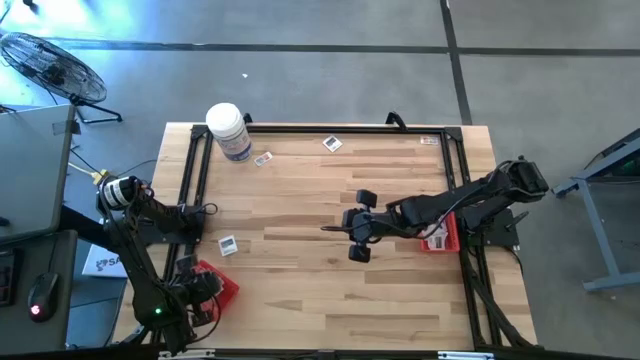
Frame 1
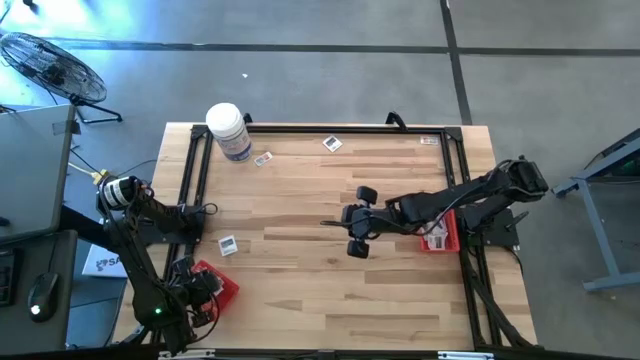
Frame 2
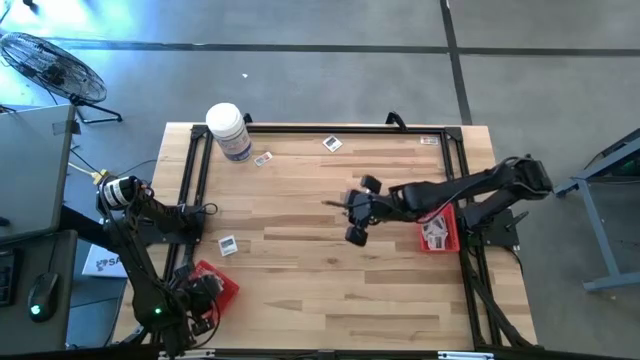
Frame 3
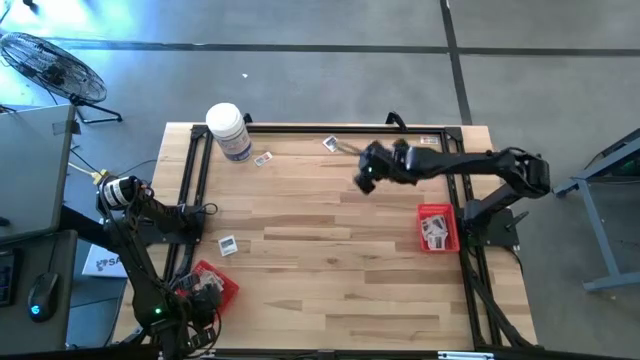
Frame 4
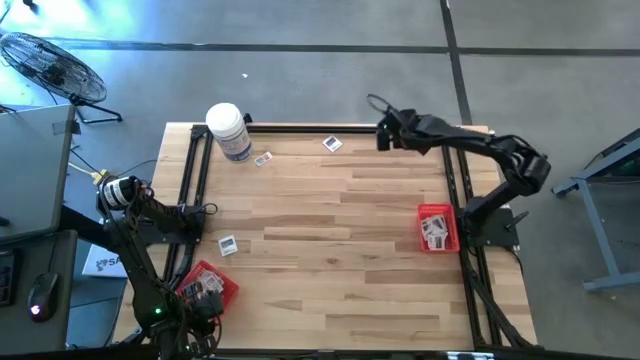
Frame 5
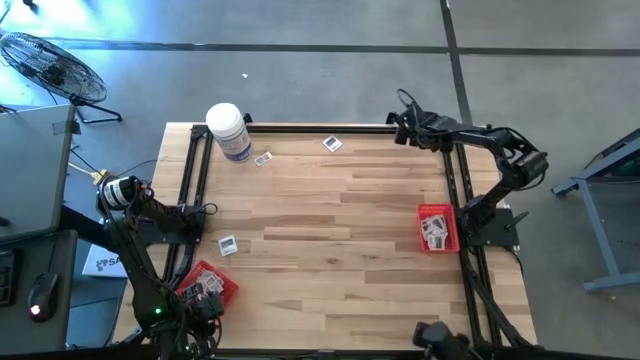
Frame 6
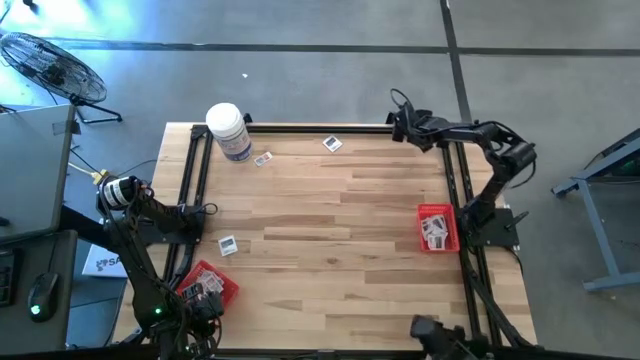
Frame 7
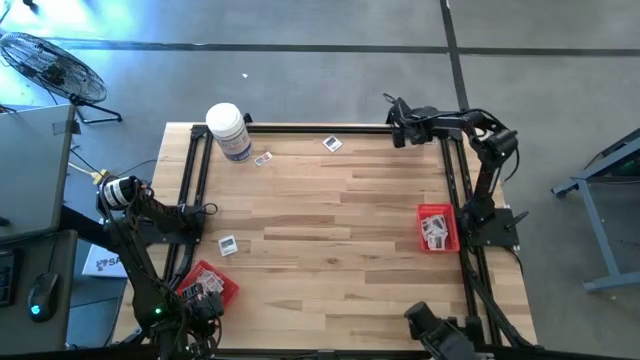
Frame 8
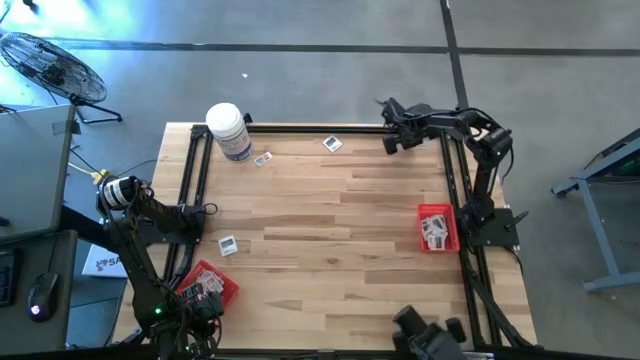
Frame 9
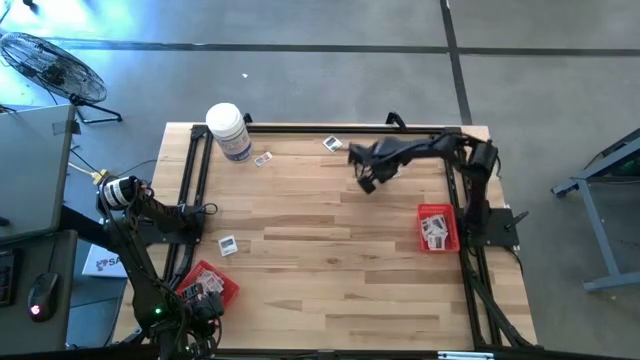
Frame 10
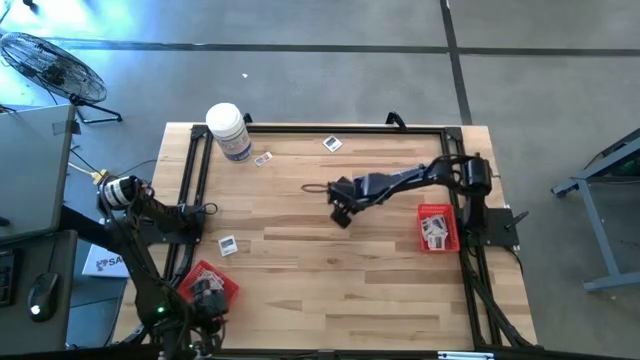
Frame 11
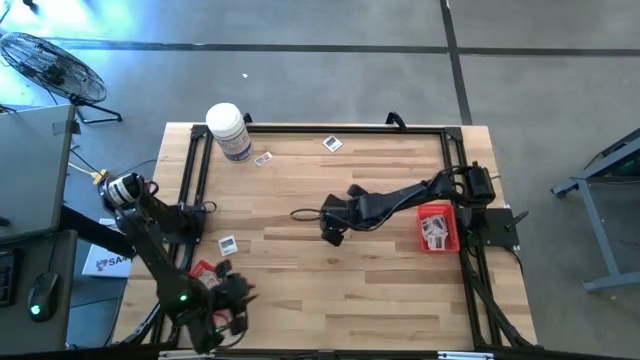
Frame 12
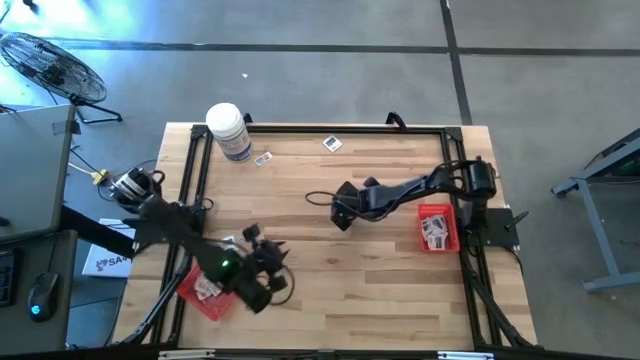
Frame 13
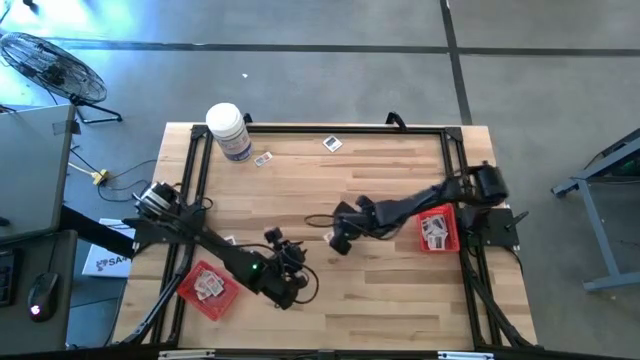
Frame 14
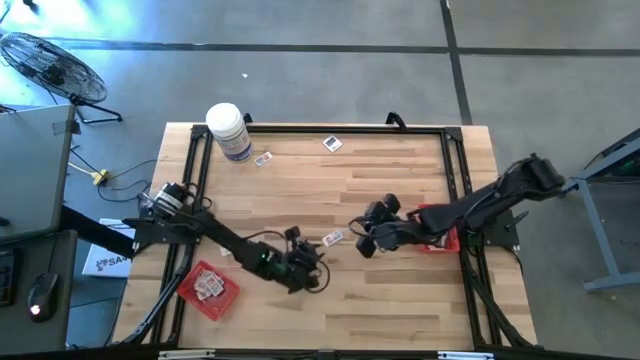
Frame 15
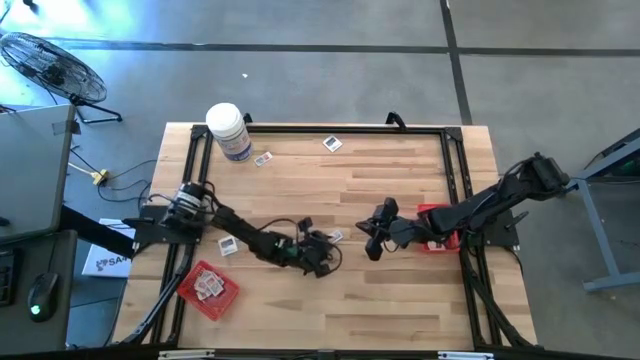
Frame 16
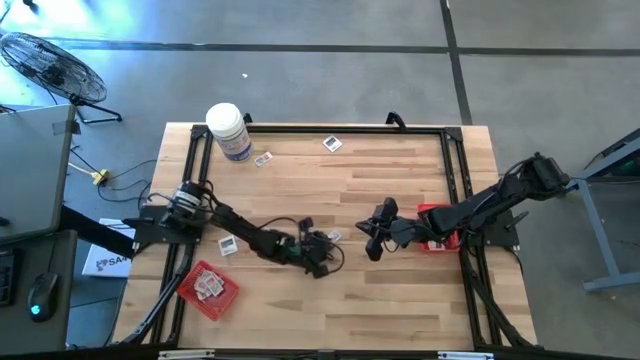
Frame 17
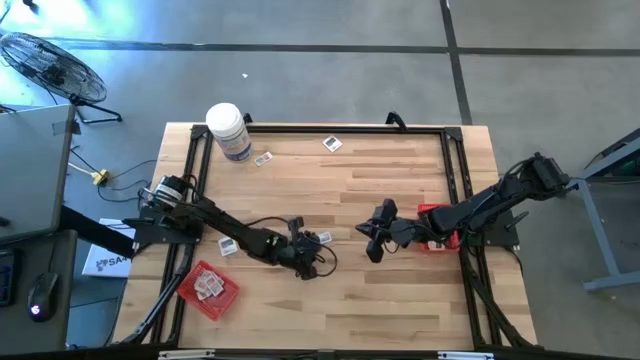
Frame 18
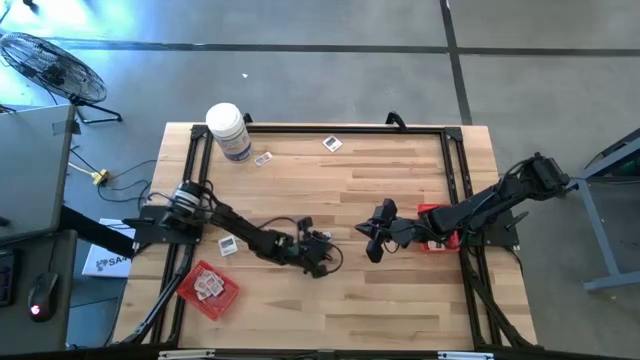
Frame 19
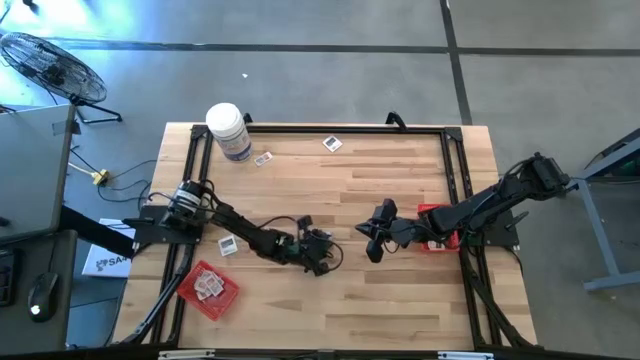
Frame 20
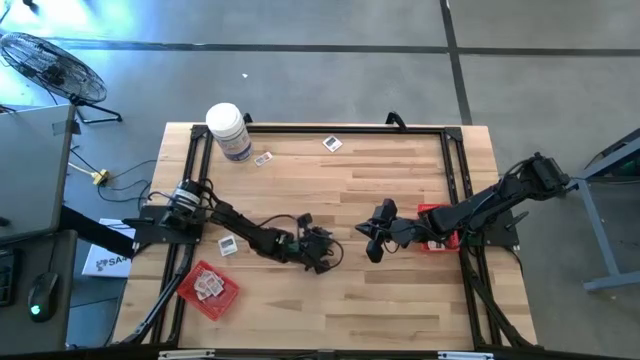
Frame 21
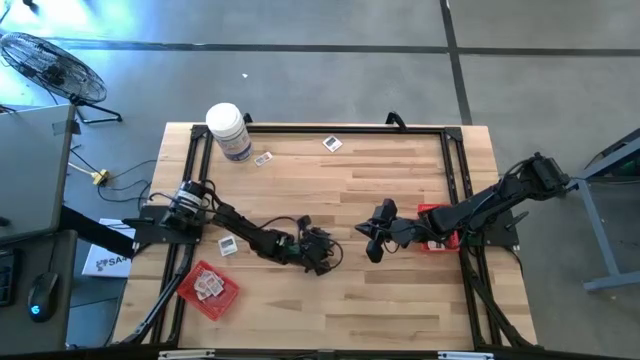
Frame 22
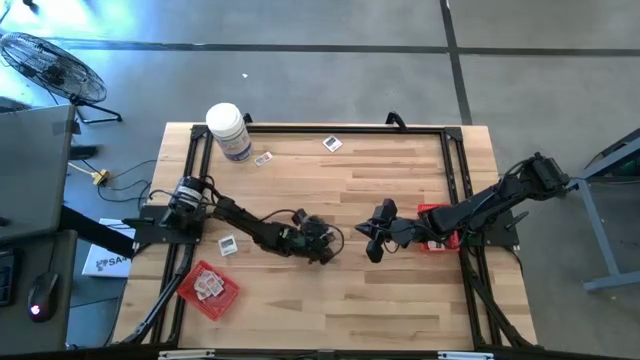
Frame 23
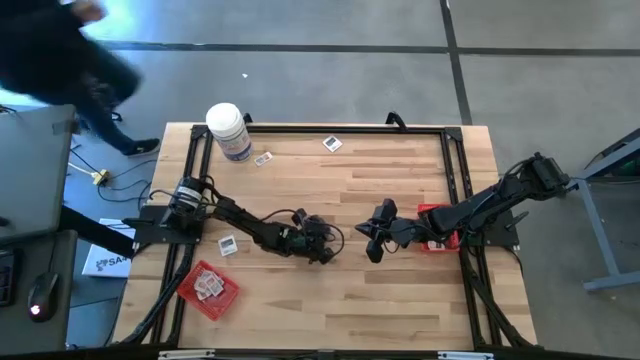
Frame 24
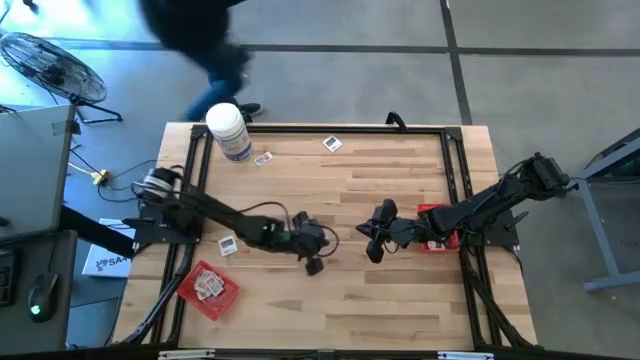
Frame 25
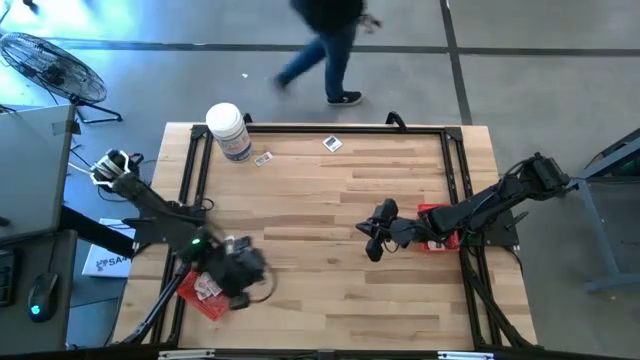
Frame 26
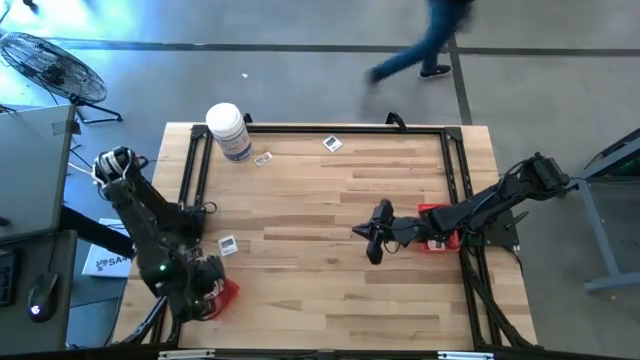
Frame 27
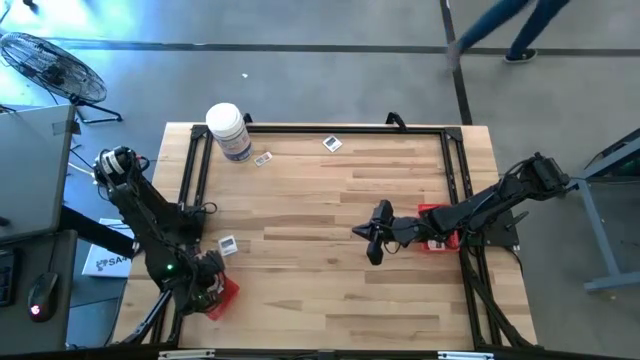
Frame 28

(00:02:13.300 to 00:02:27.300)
Task: Pick & Place First Aid Supplies
Put the ointment pack into the left red bin

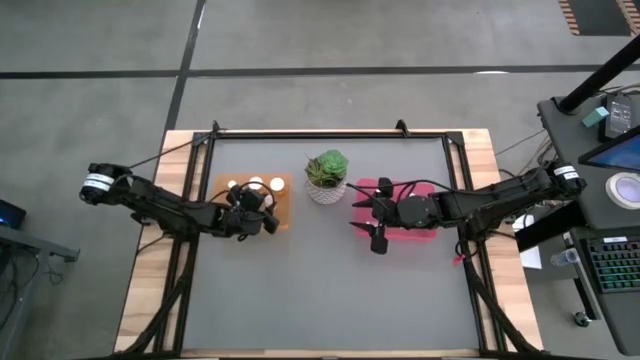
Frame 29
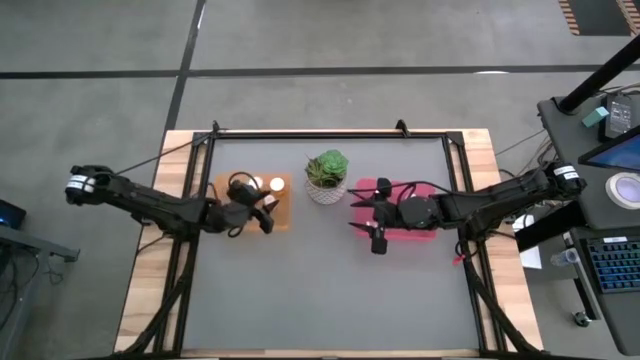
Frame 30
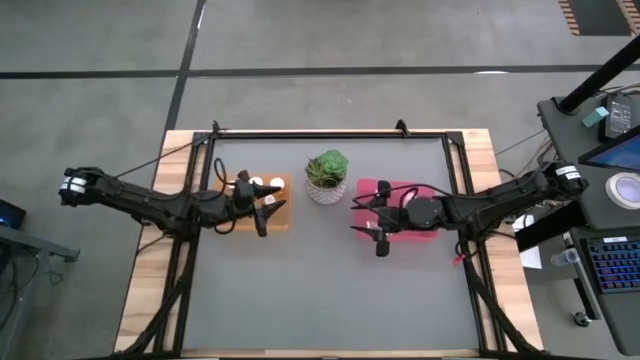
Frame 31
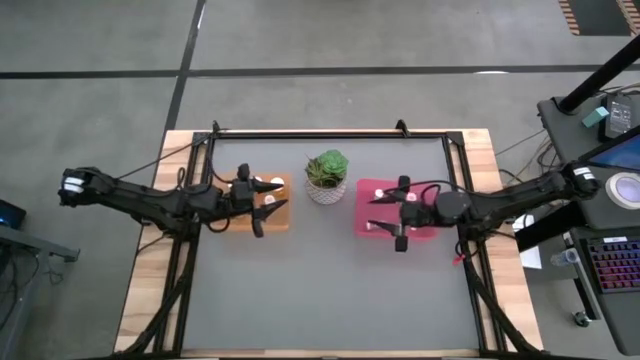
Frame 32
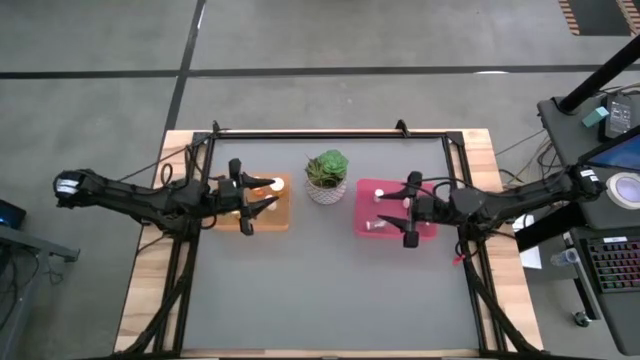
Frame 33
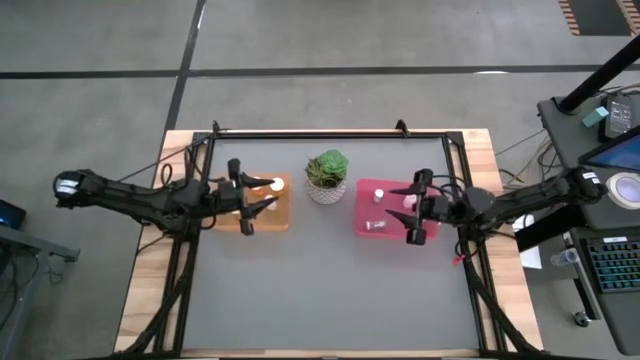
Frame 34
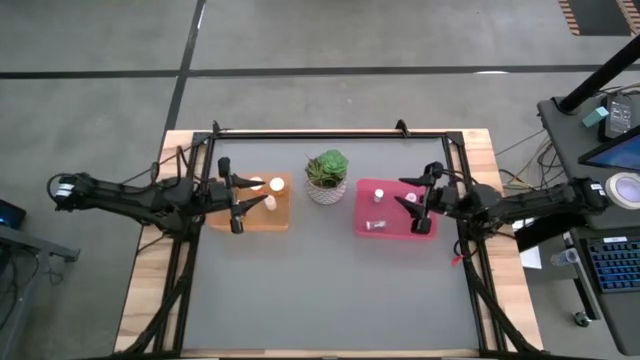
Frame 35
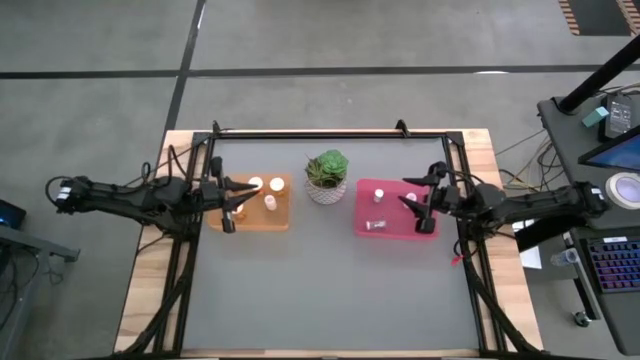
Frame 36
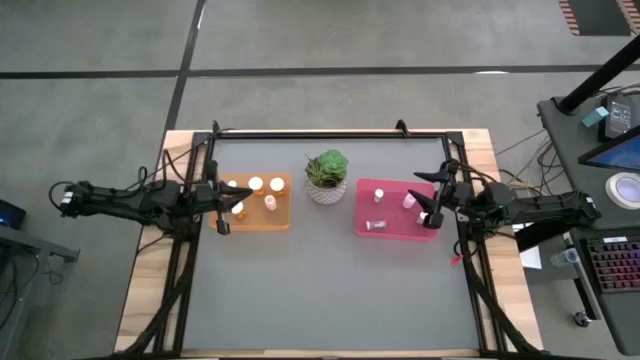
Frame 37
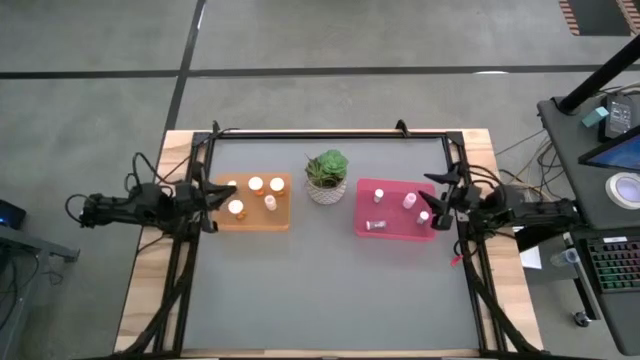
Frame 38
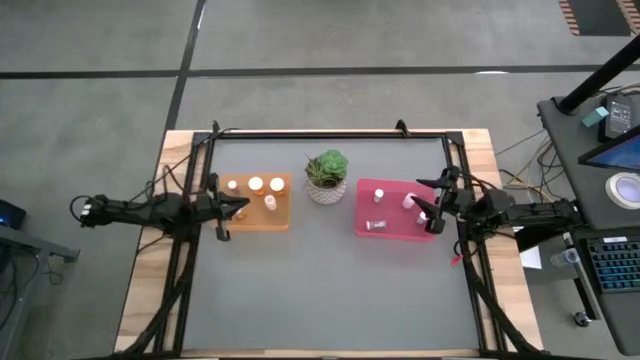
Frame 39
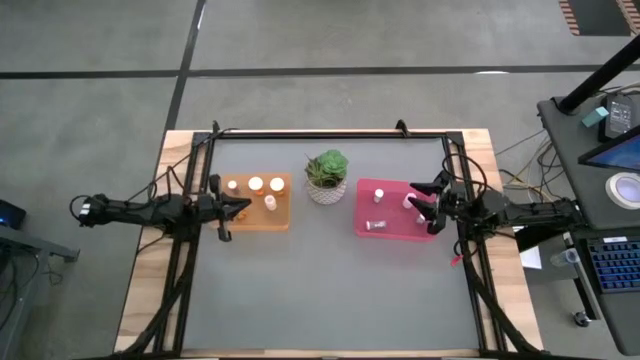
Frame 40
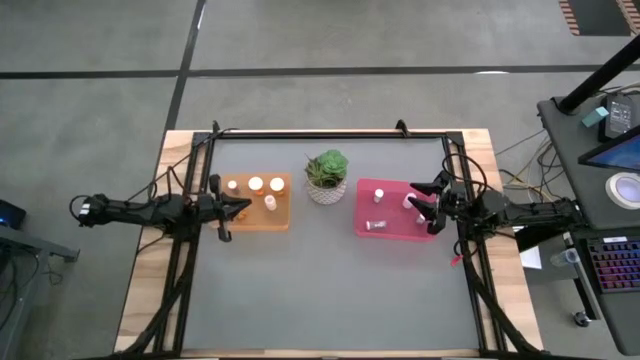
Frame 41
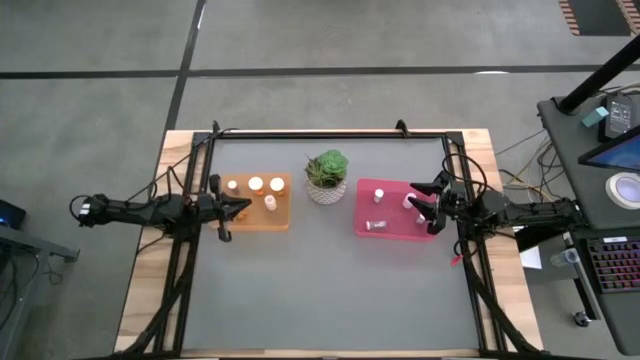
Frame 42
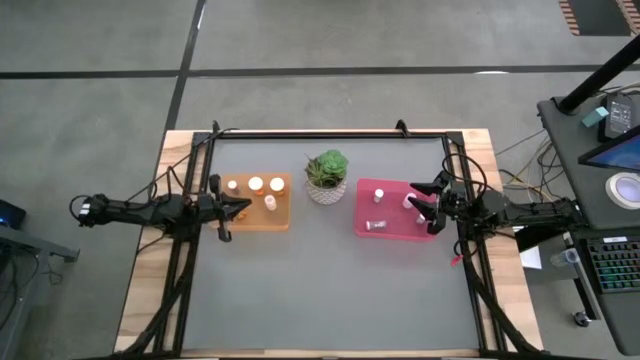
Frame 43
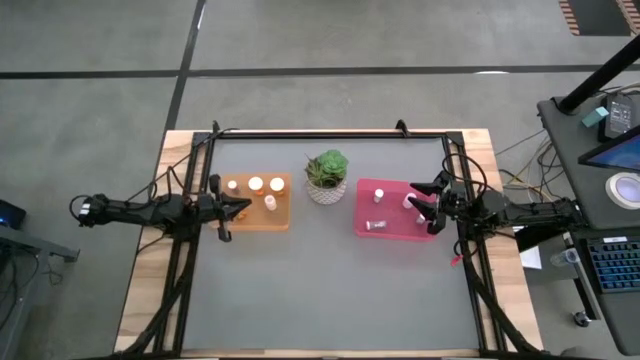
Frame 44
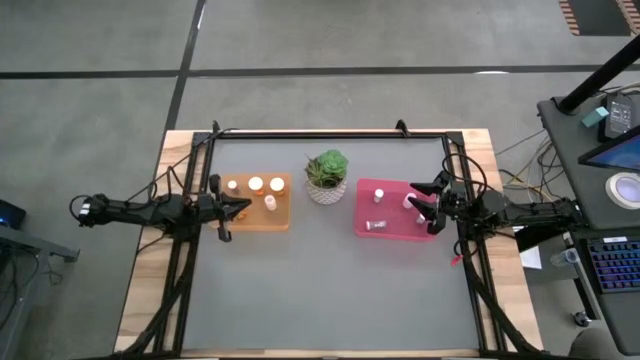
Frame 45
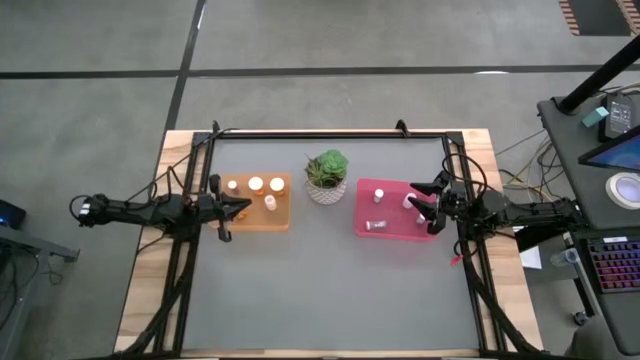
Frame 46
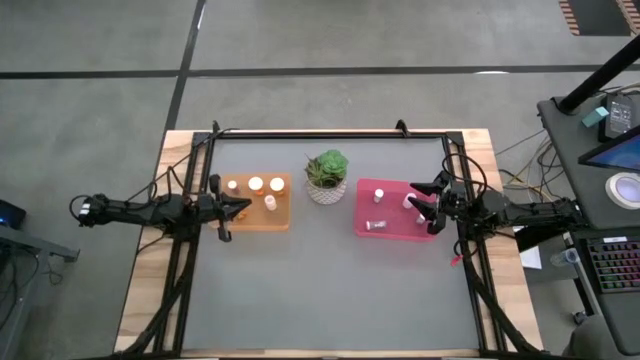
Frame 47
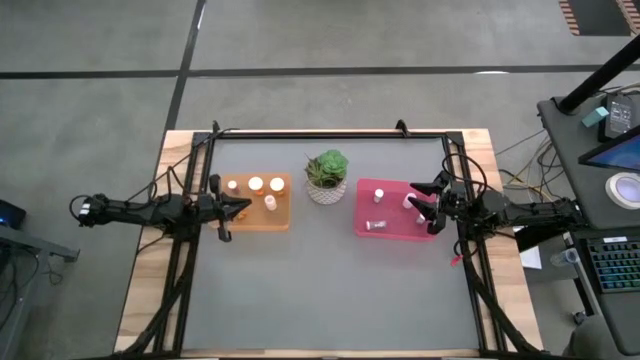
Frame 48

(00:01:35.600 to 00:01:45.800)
Task: Pick and place medicine bottles into bin by pill shape (circle, oval)
Return to Home Position
